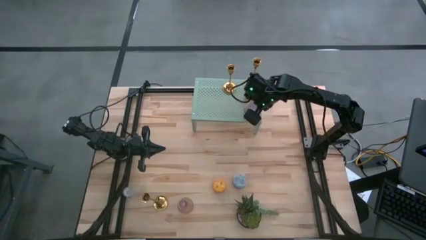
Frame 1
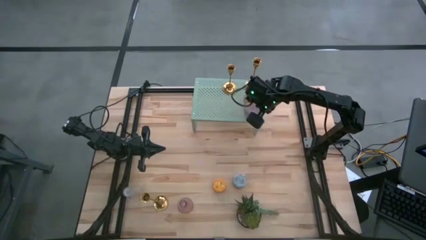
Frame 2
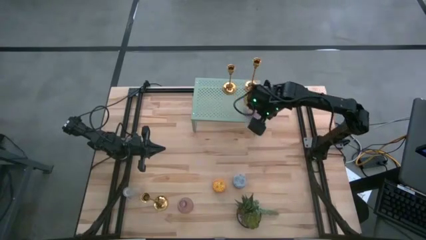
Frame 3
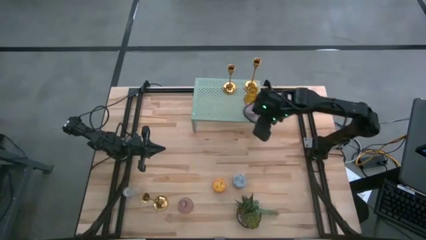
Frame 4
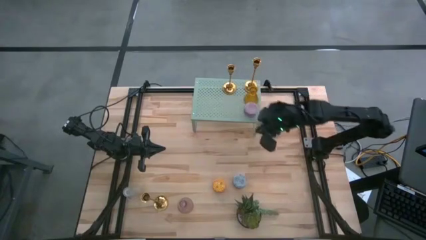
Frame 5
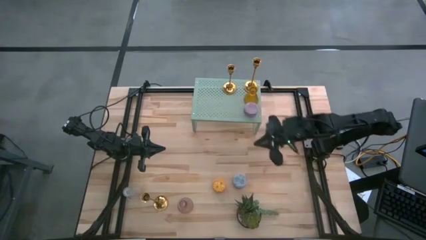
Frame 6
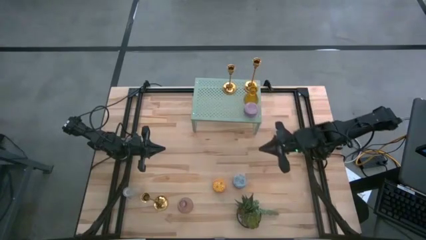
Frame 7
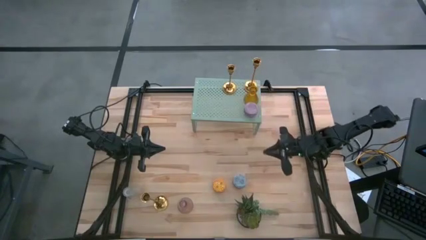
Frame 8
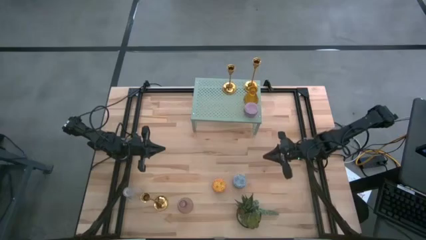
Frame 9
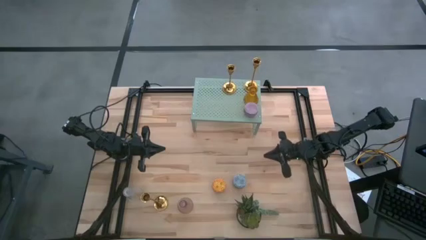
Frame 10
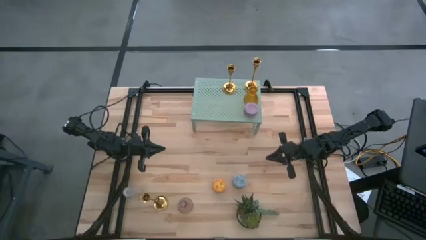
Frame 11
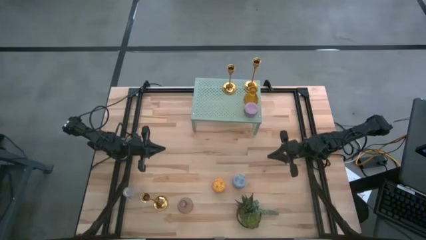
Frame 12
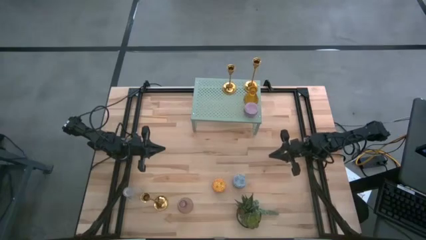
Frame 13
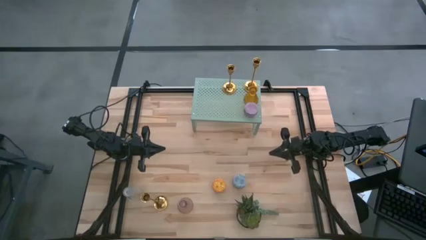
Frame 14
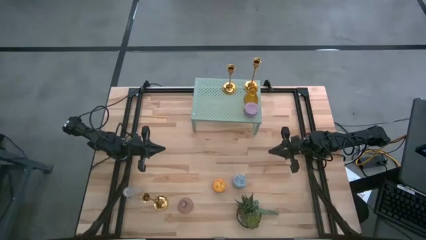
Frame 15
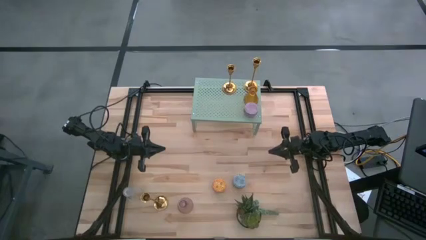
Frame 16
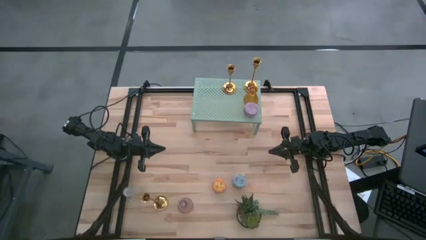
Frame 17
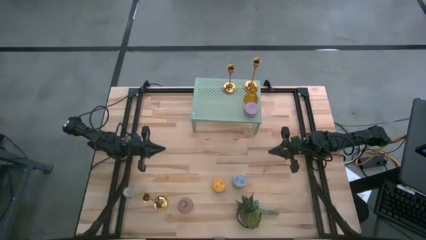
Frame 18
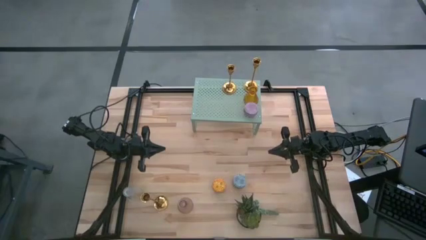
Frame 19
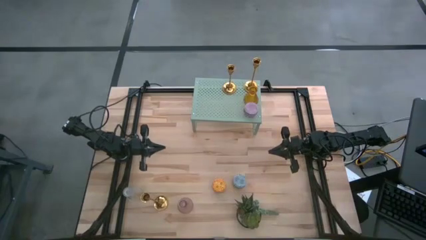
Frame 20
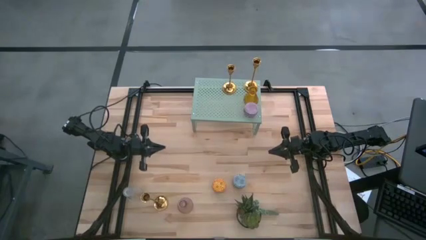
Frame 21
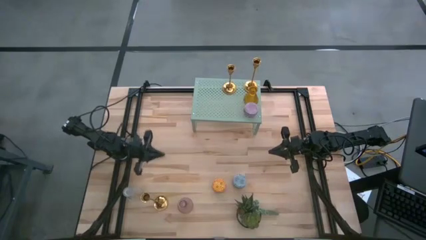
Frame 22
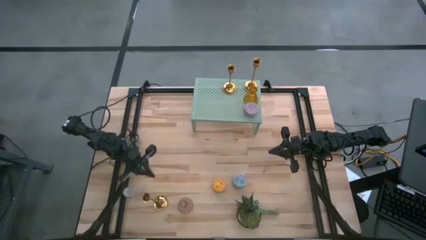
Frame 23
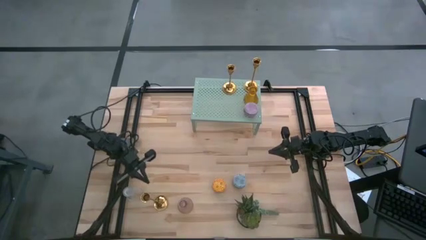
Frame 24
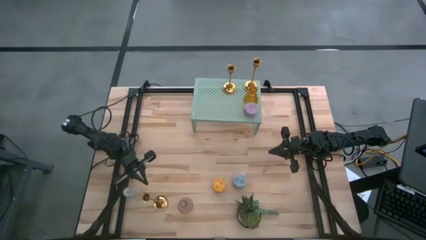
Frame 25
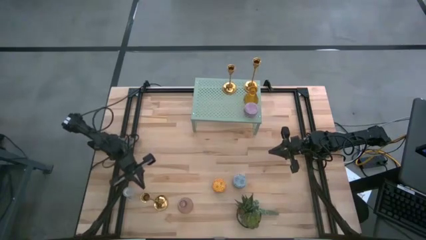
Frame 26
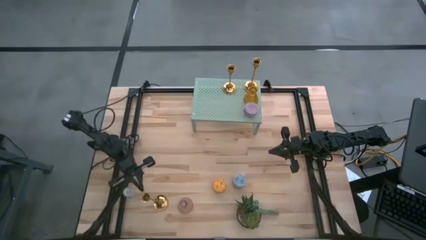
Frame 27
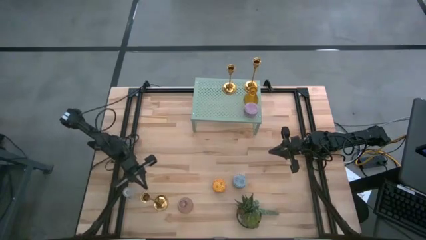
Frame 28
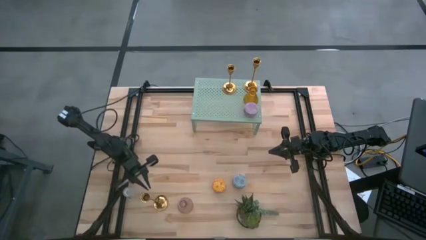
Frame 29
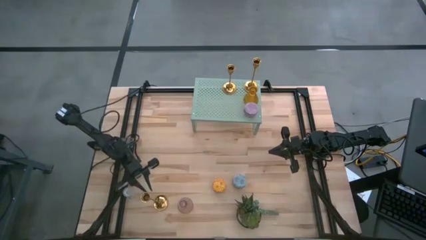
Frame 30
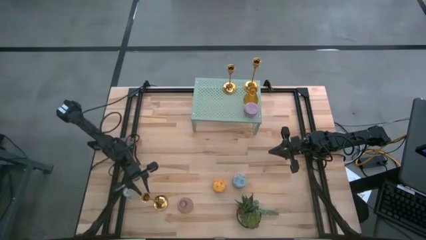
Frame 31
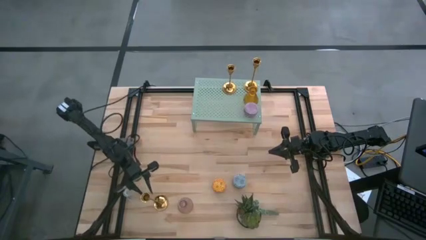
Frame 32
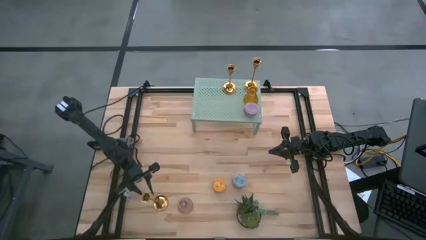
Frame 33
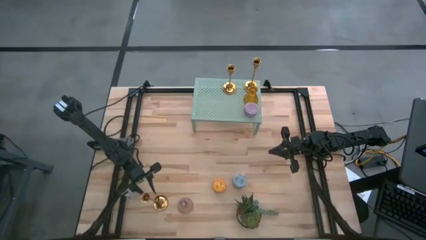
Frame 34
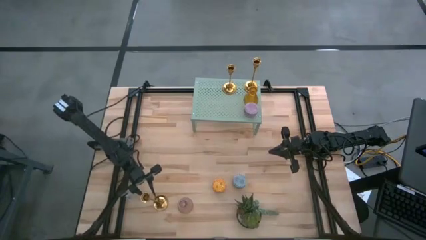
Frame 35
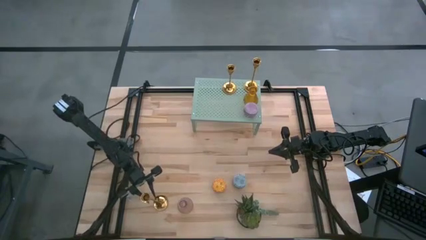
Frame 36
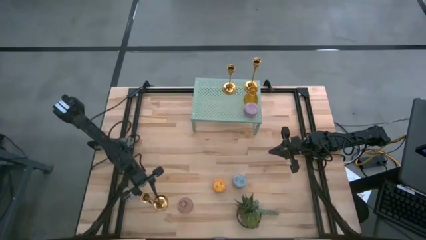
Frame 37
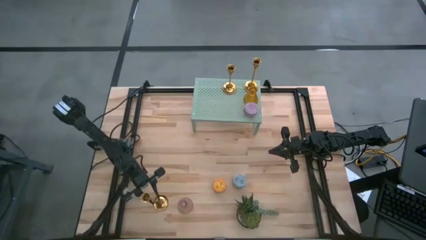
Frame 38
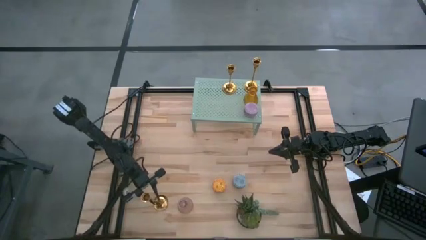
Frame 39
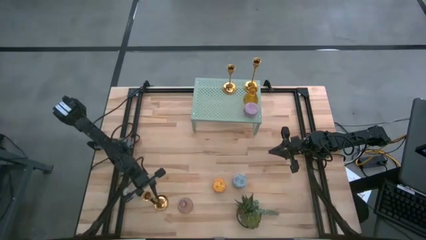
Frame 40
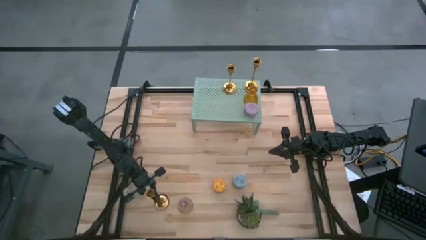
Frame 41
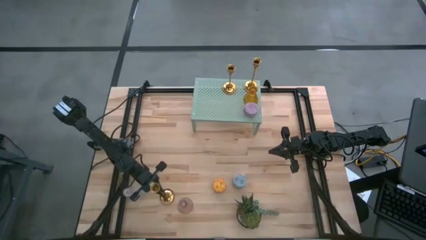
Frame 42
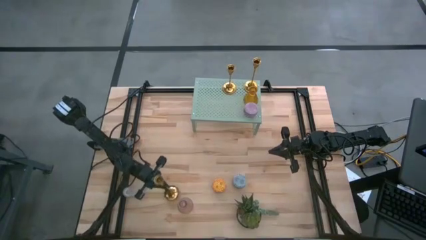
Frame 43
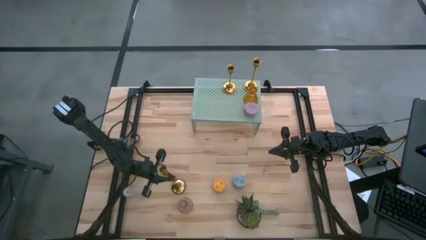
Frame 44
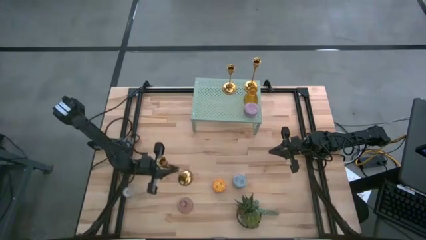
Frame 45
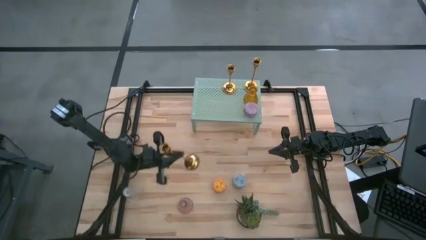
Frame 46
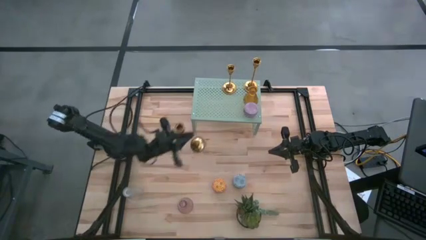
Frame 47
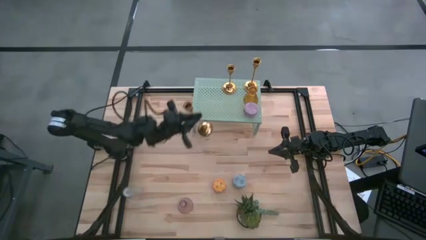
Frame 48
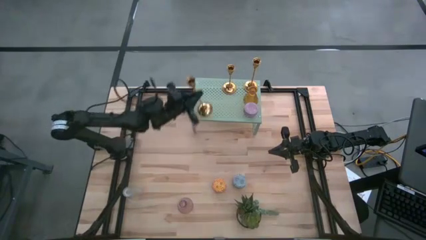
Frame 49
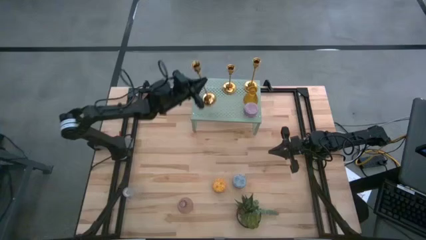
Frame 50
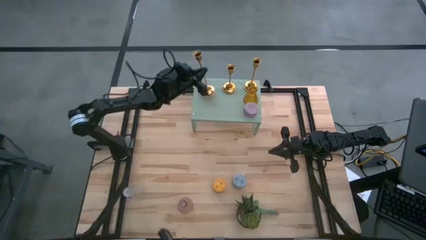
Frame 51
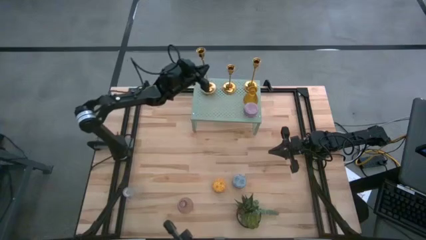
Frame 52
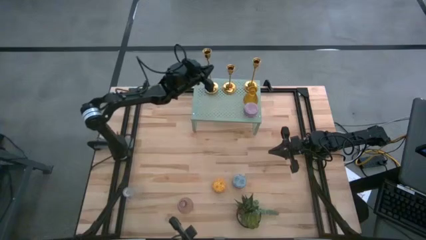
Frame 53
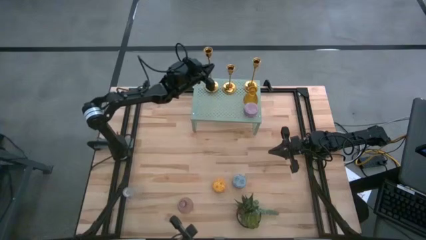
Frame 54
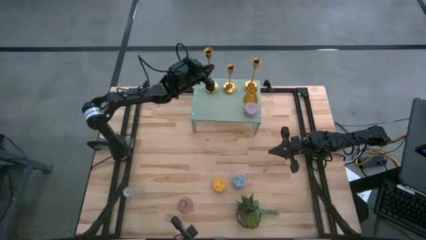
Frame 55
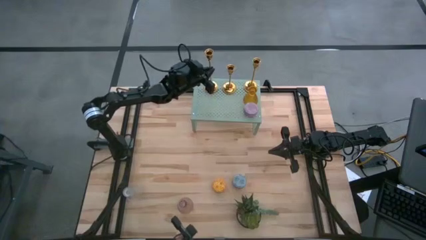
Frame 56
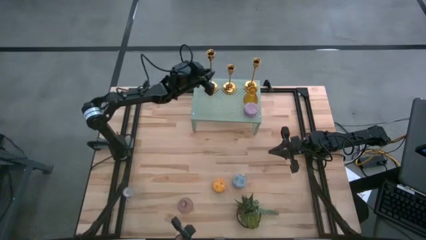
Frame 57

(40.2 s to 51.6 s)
Task: Pick & Place candle stick holders
Put the gold candle holder on the shelf

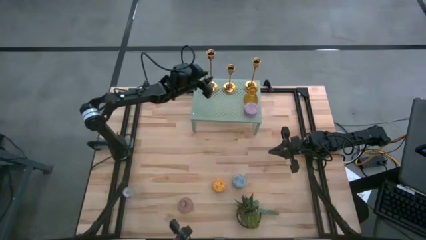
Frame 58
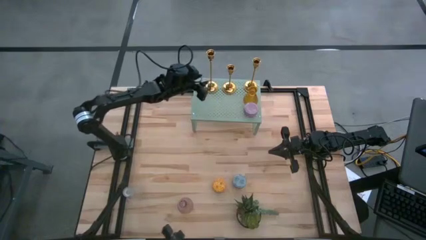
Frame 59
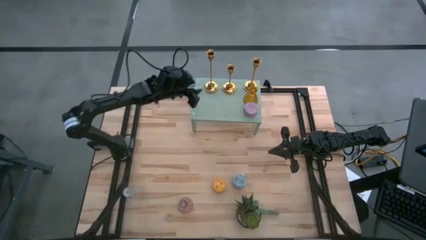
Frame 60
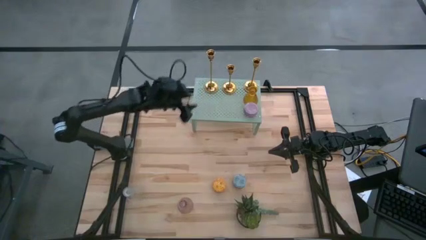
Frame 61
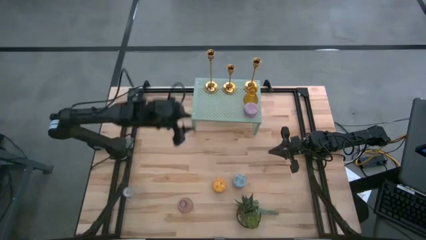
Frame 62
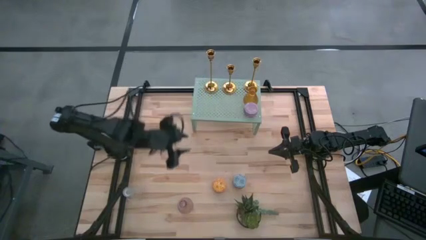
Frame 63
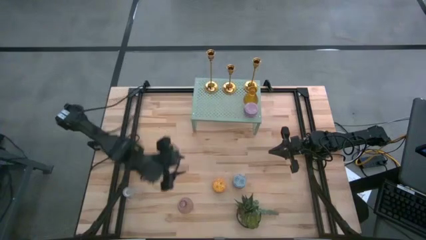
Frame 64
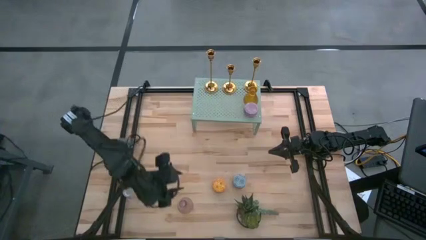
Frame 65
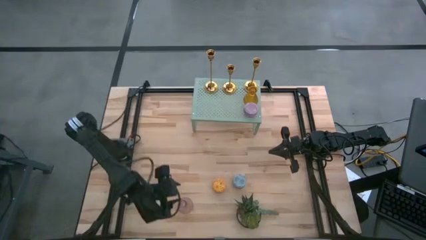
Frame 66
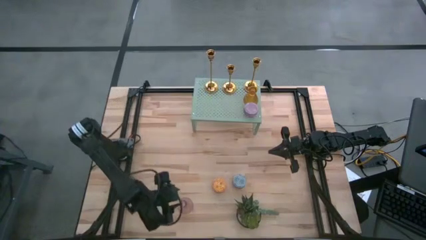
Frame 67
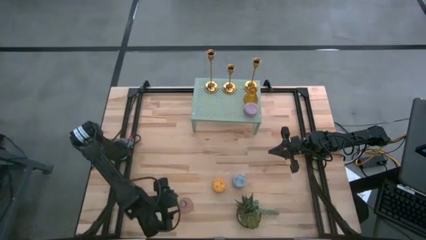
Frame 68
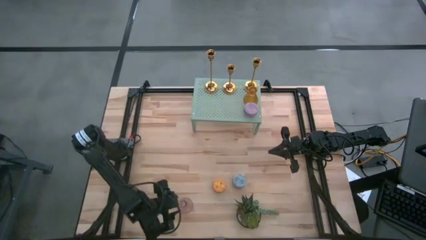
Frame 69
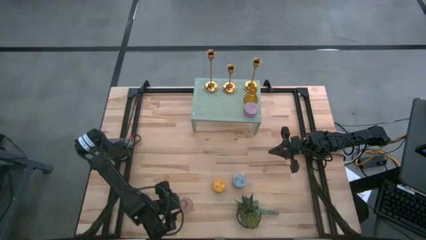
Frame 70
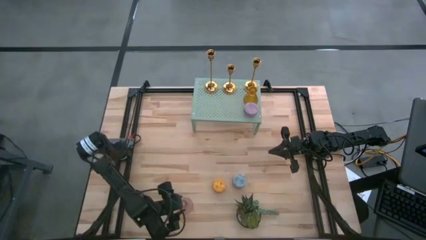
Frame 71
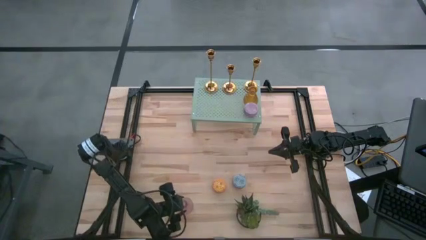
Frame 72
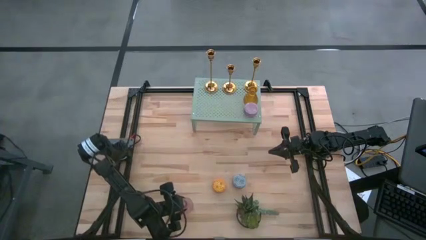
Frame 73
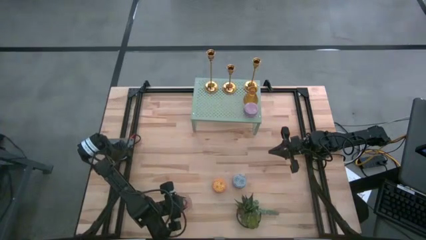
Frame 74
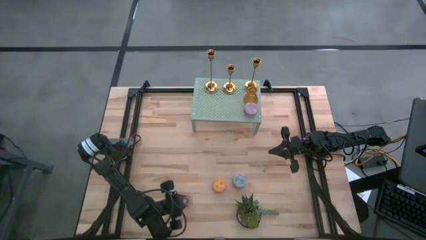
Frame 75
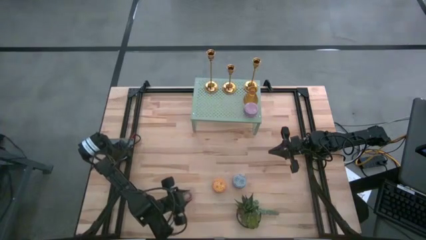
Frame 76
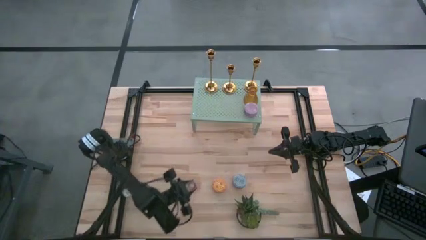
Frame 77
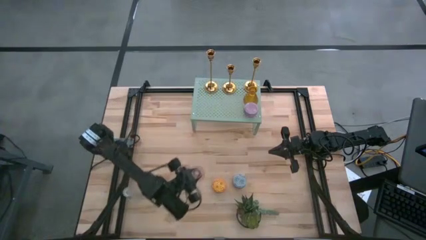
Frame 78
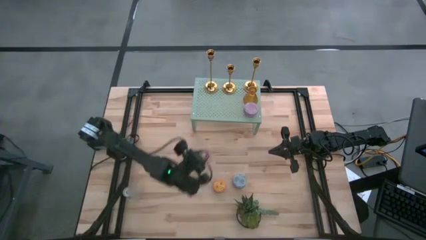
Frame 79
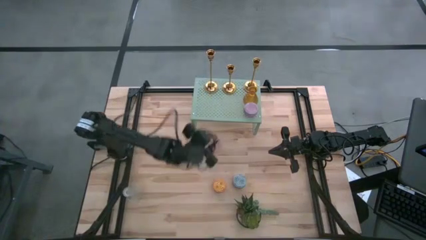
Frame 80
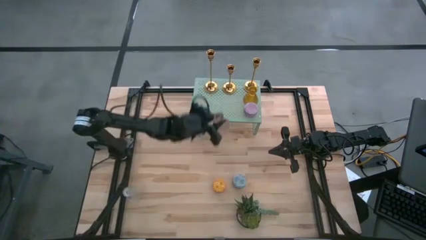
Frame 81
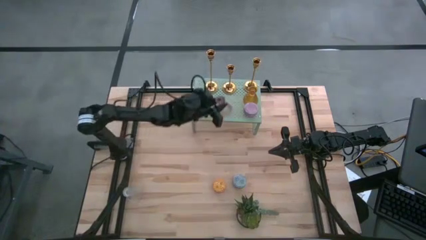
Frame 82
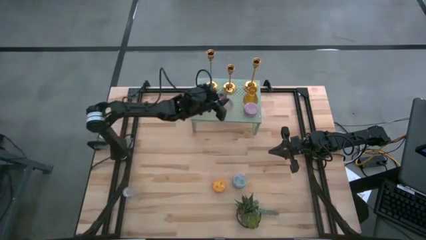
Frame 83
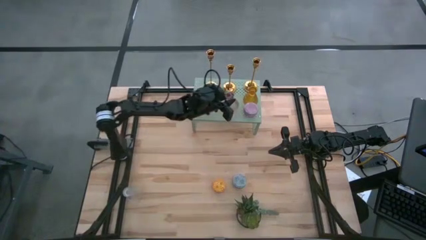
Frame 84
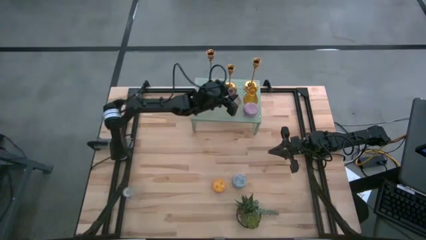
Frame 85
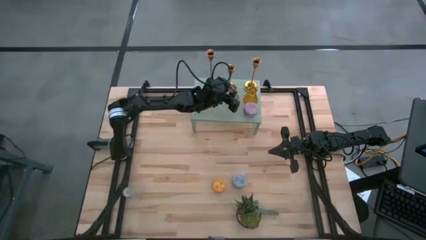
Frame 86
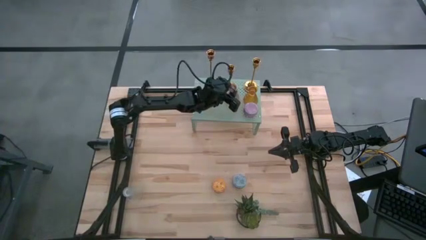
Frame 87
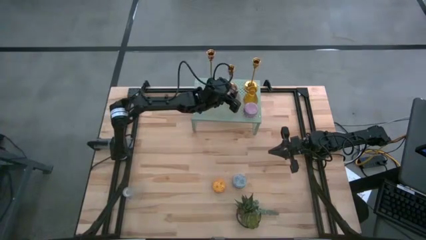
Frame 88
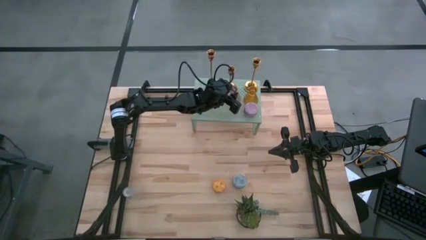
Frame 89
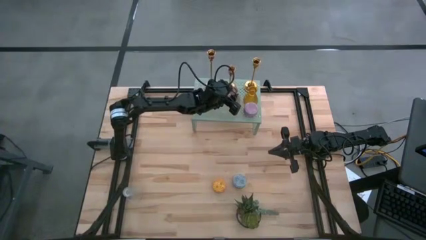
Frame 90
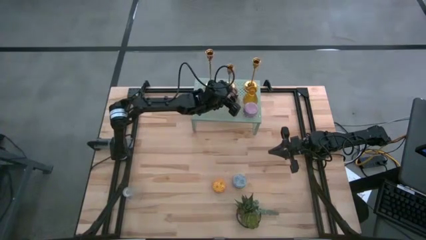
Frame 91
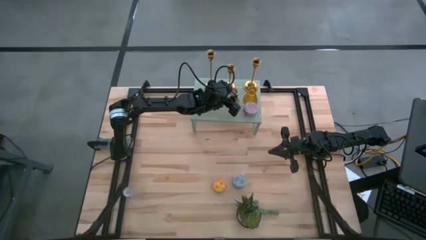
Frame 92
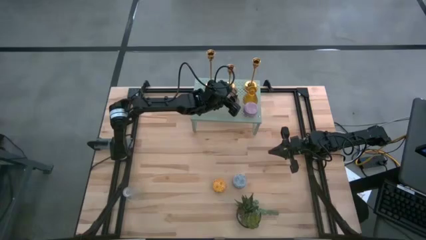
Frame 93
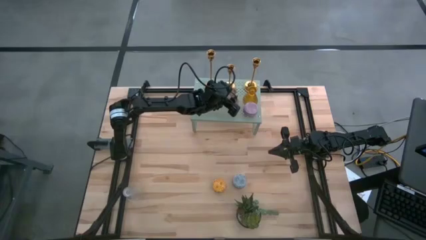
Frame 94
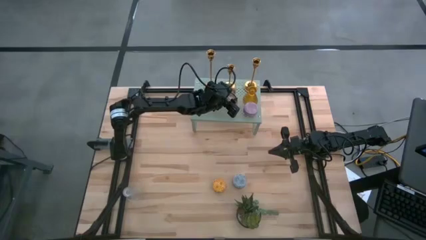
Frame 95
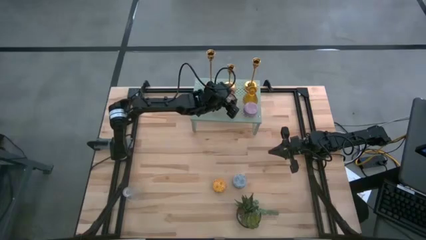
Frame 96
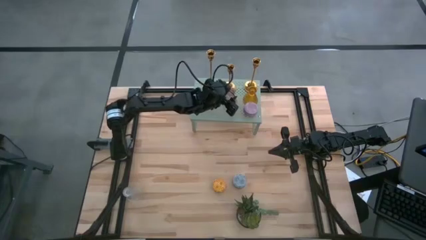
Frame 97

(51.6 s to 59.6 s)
Put the purple candle holder on the shelf
